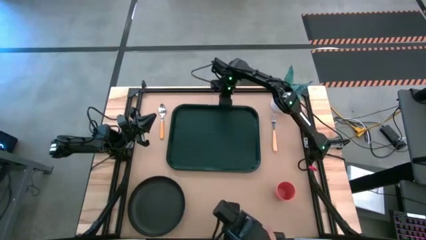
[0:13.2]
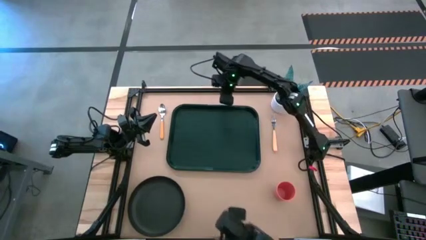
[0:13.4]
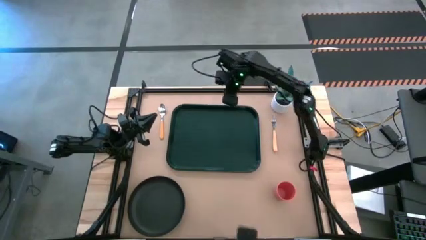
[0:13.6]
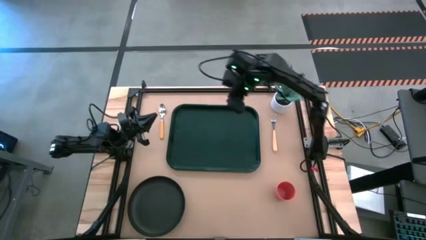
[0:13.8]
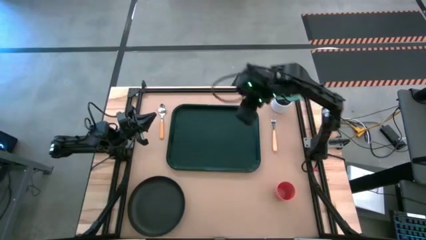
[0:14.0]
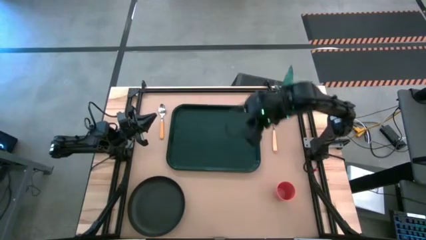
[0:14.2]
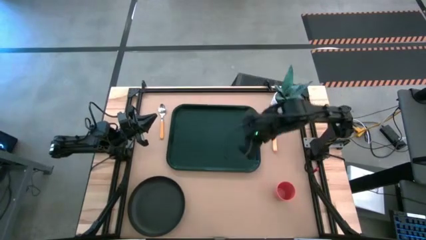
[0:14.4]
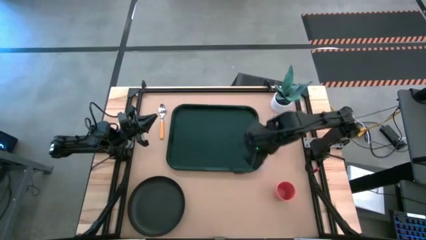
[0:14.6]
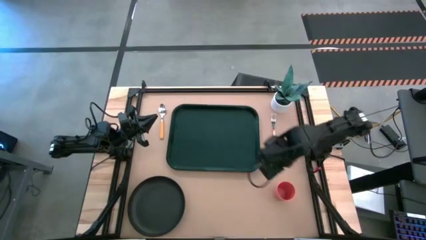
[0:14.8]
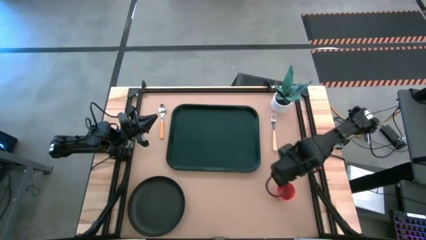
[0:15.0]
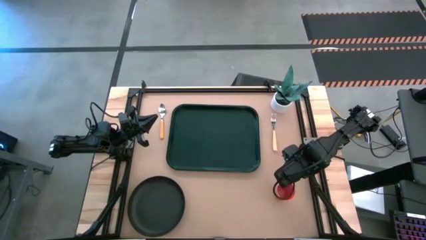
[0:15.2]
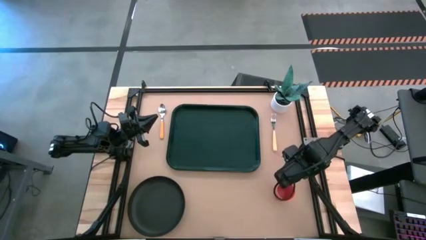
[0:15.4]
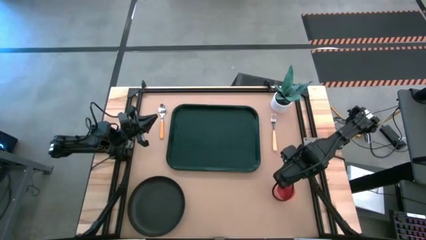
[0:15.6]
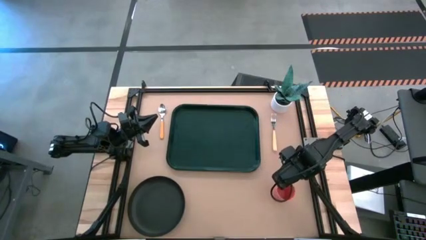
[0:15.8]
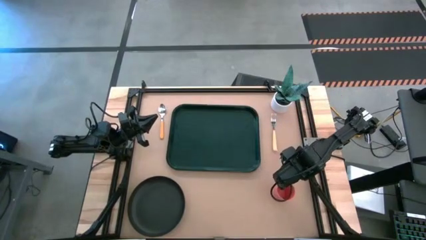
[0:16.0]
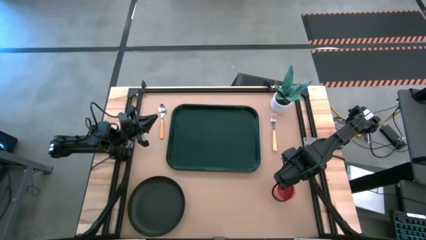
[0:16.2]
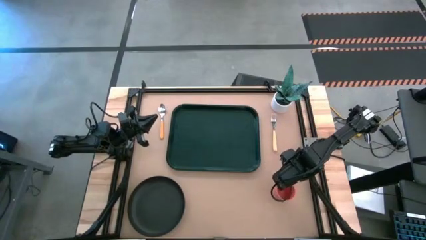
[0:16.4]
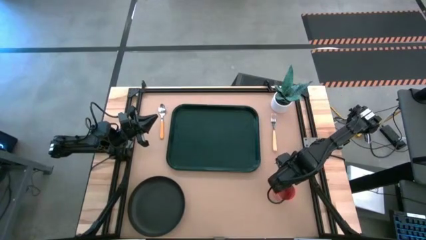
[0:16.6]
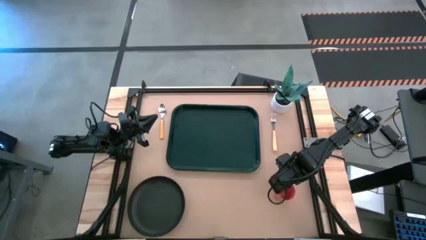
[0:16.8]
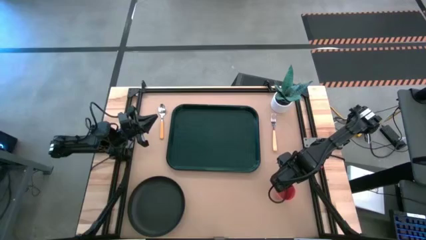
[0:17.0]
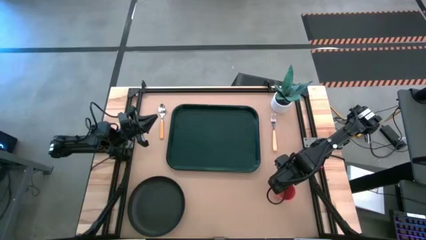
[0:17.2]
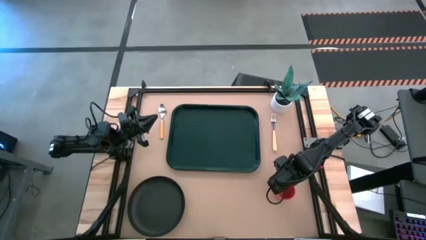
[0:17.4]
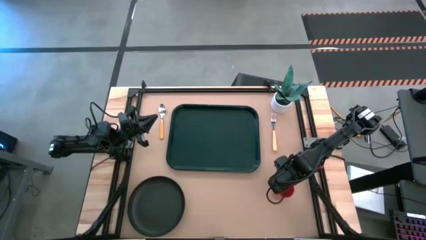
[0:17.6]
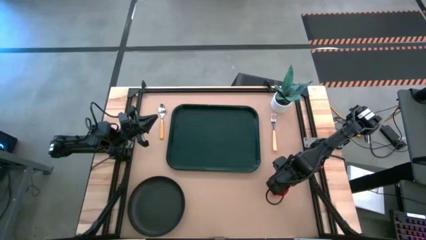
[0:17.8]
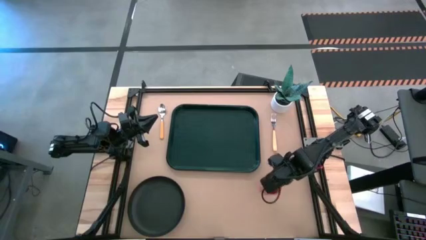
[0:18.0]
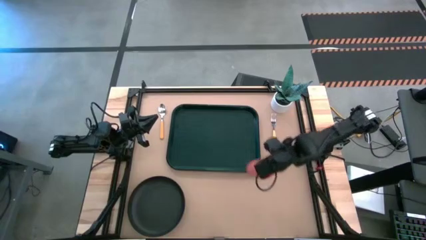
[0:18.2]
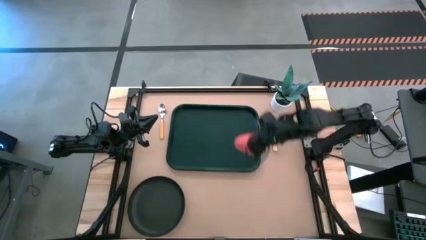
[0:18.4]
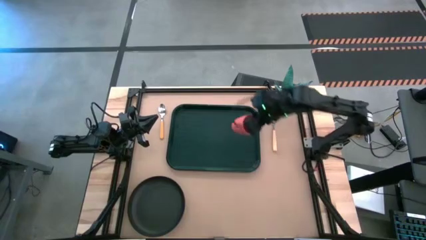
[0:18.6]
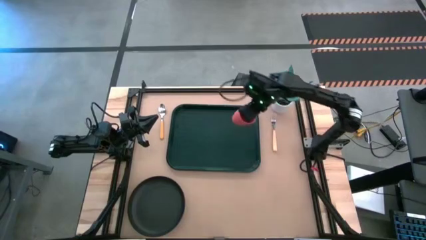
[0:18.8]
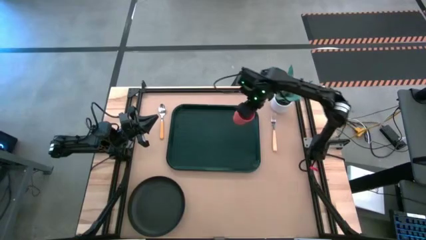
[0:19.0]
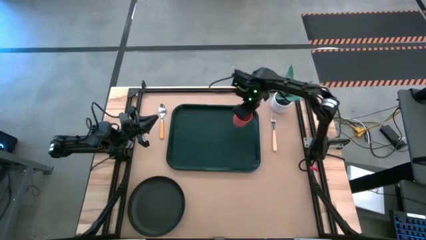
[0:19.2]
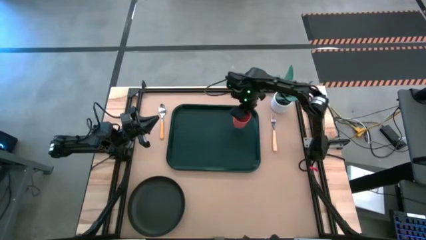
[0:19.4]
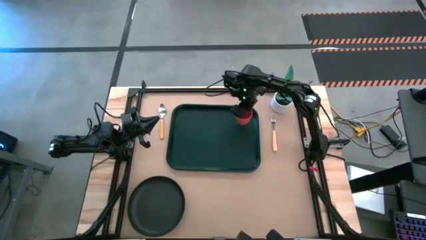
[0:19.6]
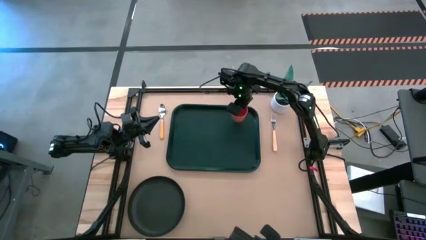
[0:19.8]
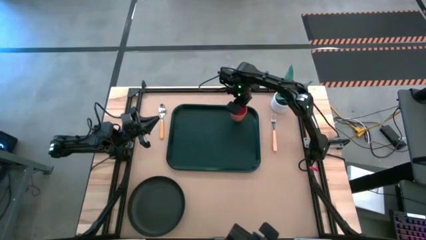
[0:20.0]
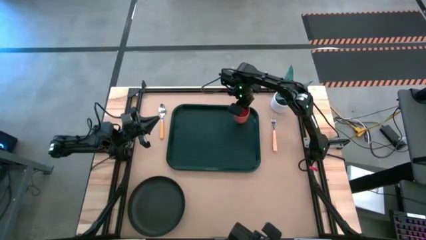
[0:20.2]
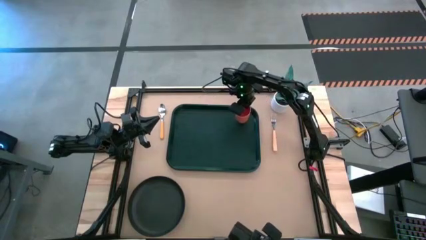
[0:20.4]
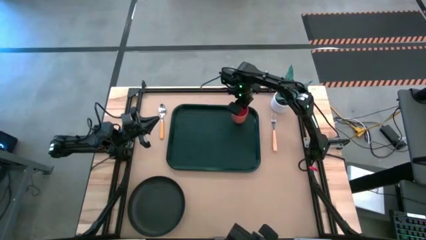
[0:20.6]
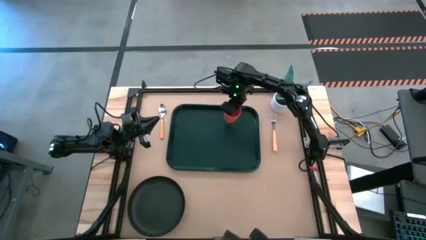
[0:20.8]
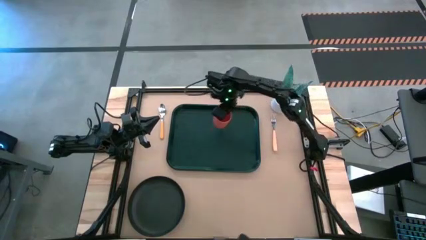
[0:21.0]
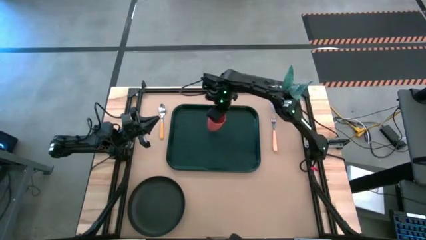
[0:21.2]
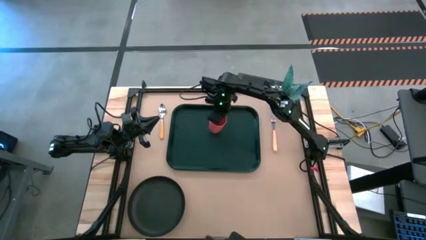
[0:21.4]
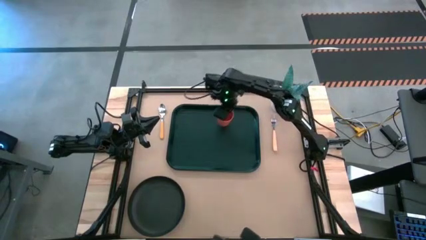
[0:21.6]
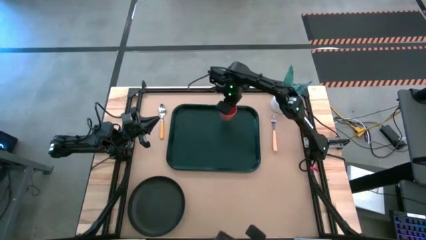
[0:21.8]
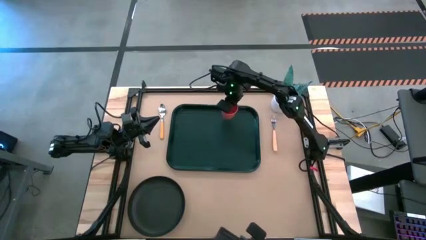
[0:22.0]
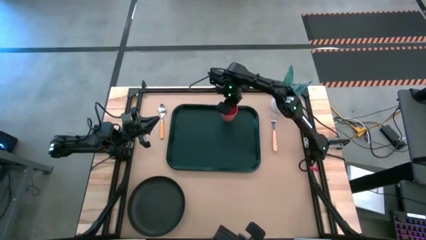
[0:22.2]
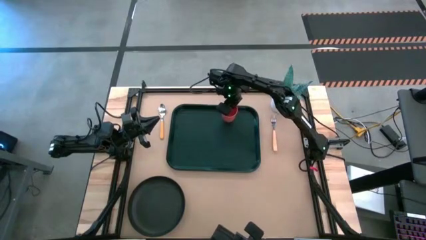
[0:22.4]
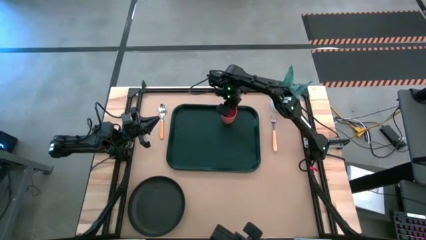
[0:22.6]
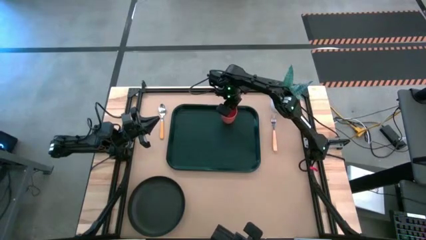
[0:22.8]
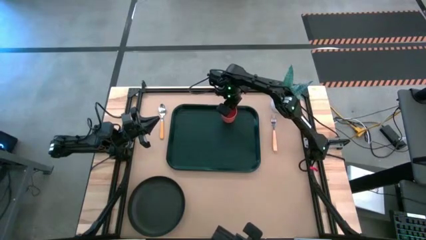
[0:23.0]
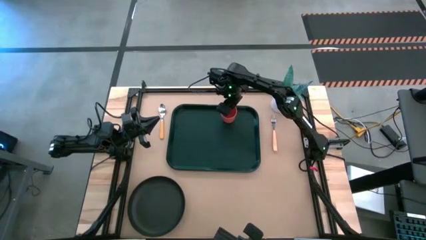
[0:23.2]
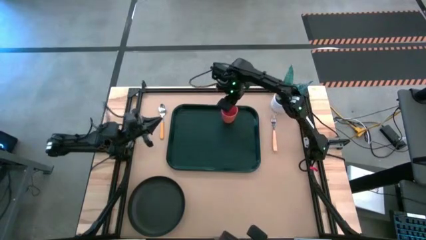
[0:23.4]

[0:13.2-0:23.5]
Task: Pick and place plate/cup/fork/spoon on tray
Put the orange cup on the black tray

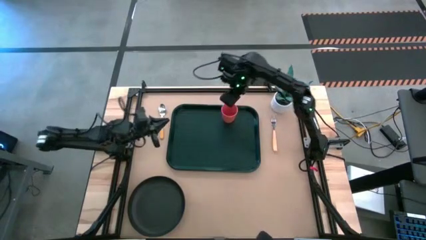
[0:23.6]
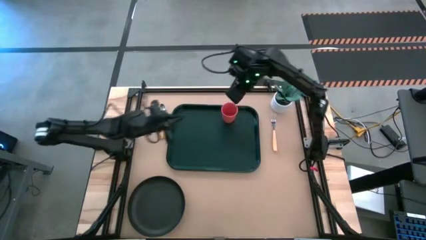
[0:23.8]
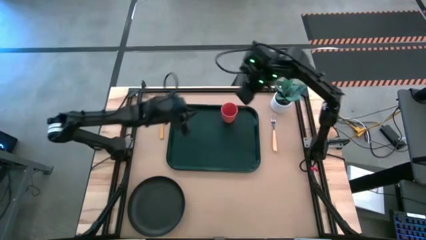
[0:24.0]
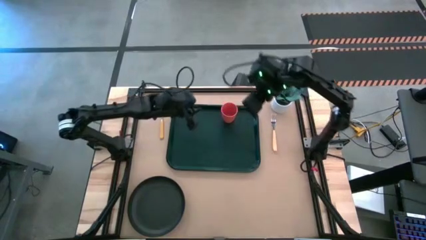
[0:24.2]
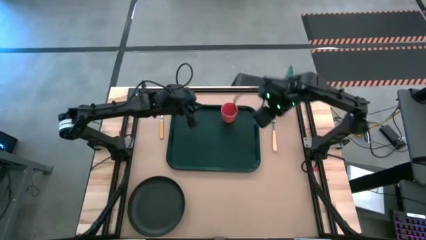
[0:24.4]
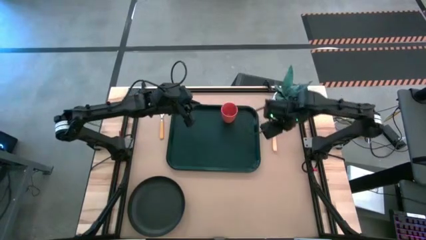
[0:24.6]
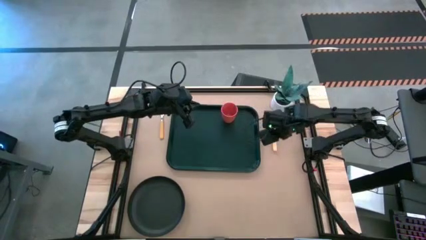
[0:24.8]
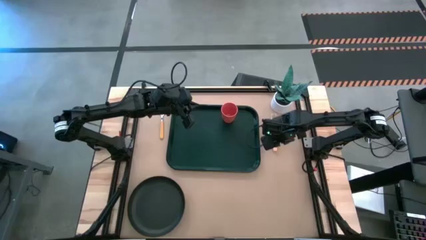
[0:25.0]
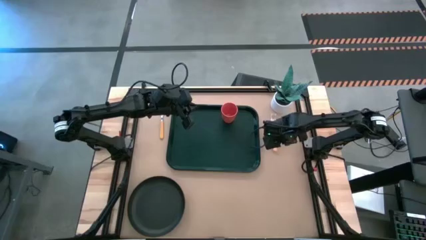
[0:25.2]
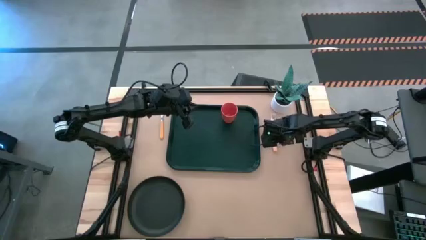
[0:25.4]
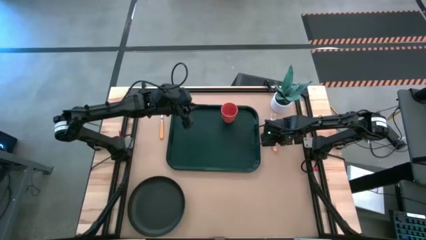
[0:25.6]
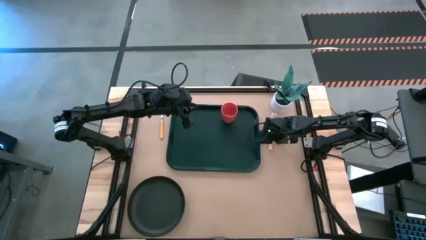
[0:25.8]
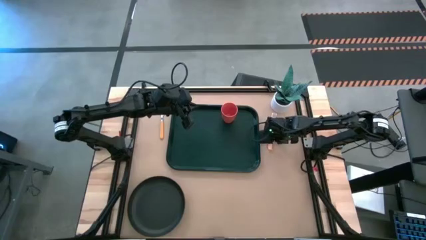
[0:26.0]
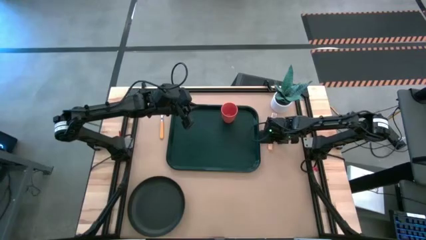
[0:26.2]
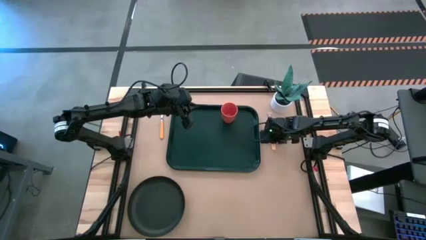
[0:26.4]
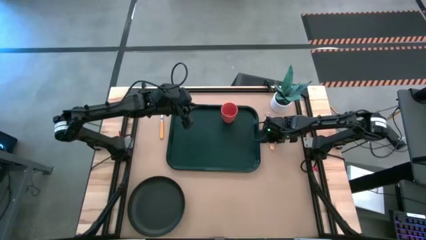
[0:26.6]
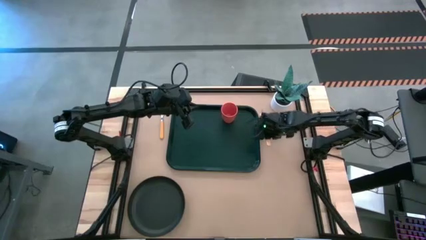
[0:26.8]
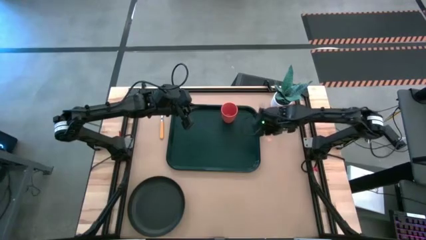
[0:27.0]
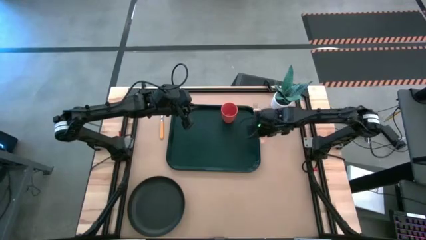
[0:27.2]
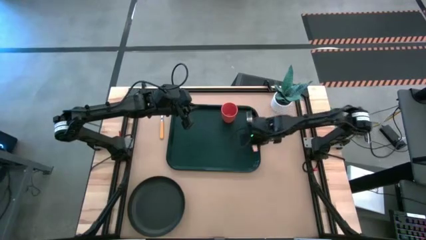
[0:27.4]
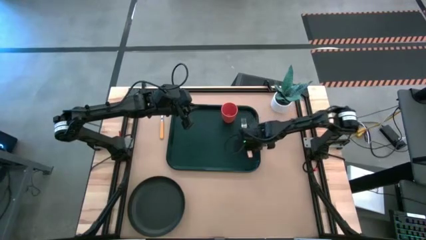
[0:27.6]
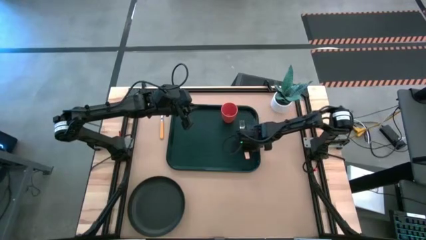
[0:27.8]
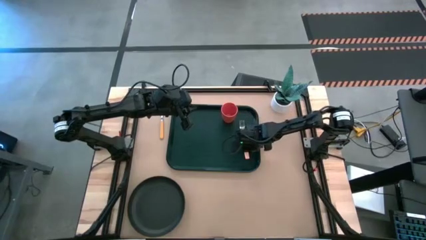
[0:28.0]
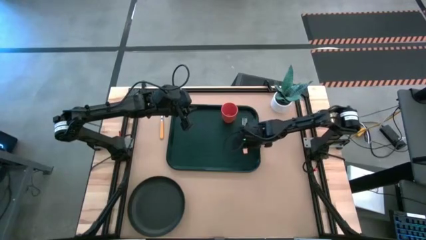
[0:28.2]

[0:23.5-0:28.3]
Put the orange fork on the black tray

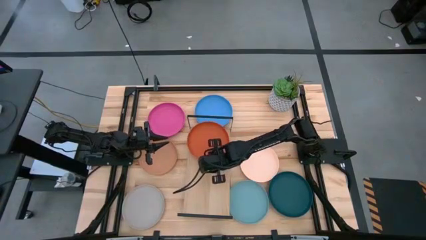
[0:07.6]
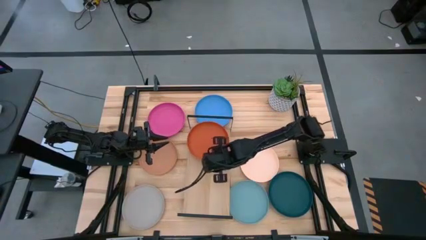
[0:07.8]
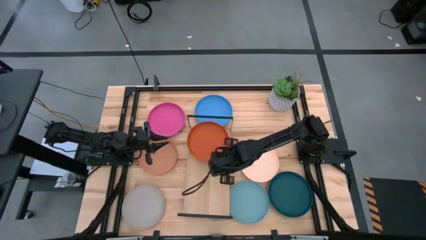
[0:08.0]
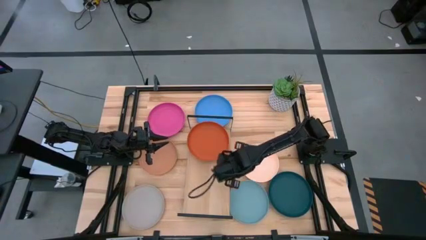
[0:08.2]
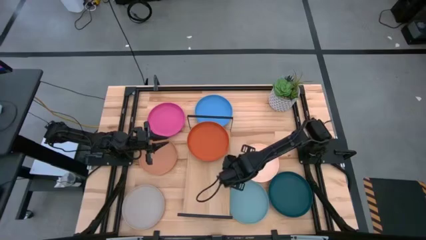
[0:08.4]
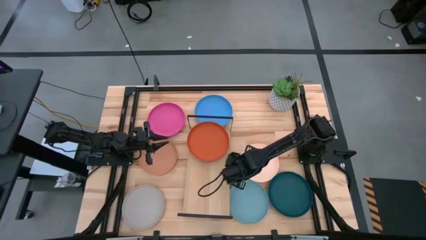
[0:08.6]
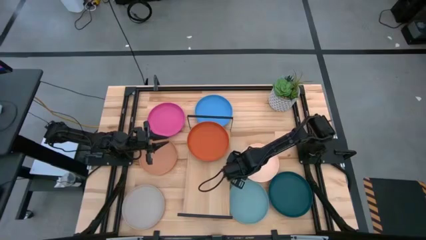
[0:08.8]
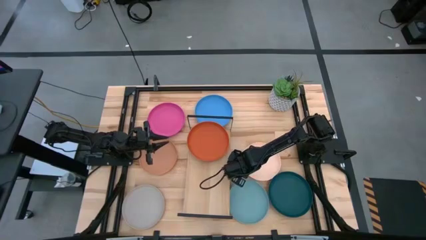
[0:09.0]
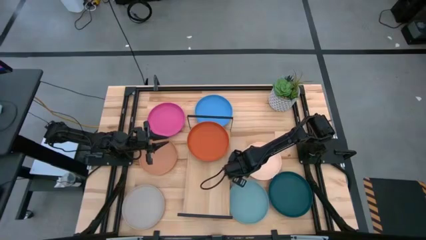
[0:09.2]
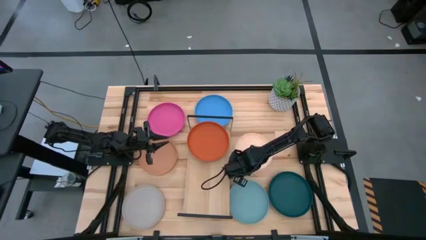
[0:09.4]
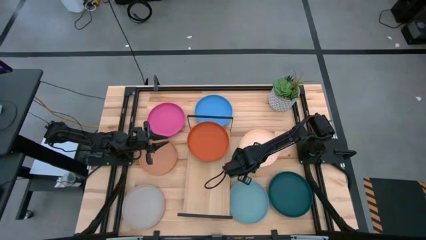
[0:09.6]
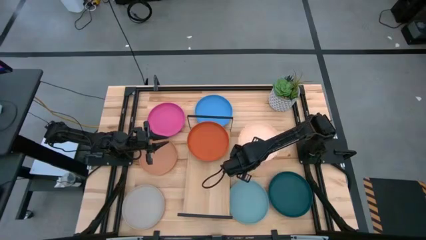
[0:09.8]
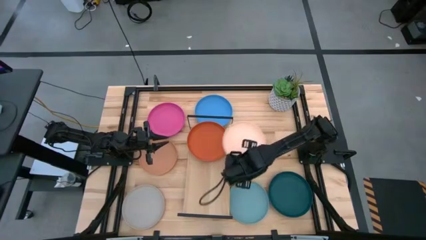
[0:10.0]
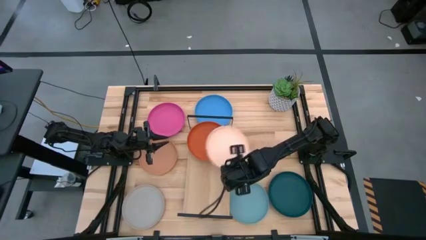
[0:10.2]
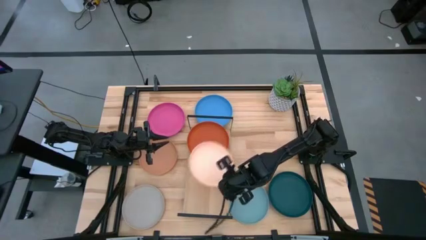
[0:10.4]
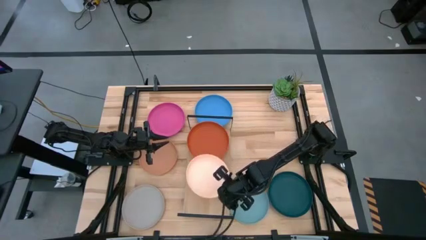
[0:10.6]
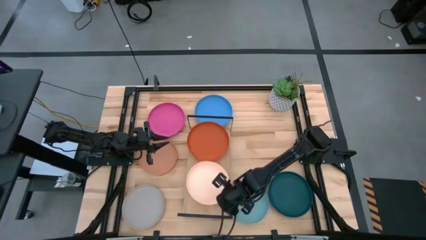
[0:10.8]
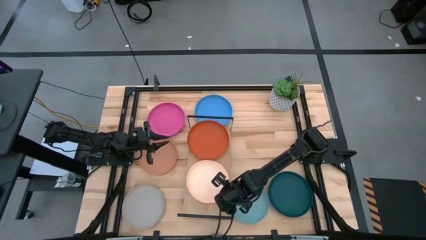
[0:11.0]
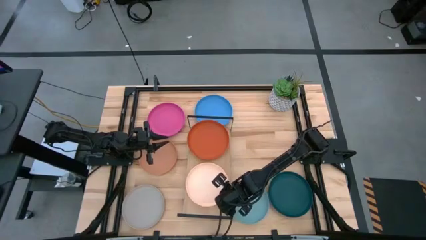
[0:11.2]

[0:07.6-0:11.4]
Task: Place and stack plates onto a shelf
Put the white plate on the shelf
